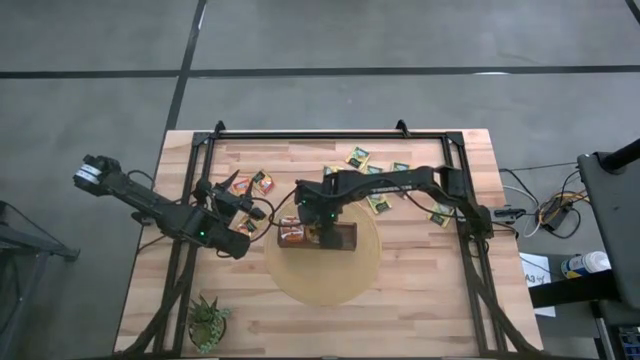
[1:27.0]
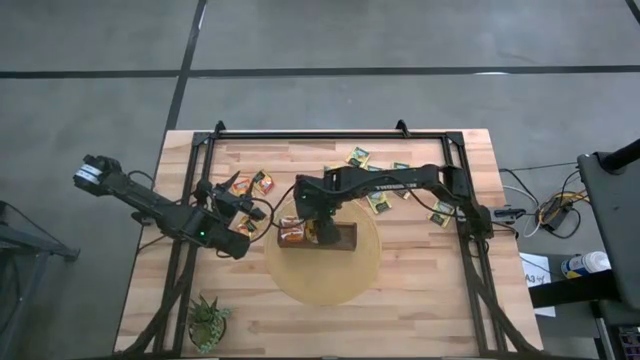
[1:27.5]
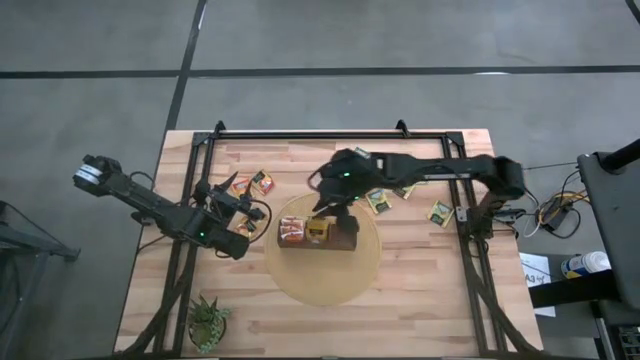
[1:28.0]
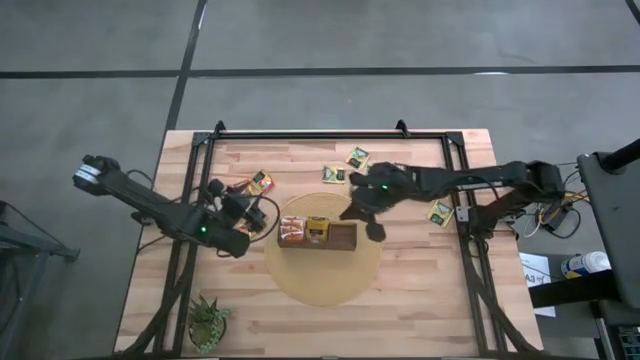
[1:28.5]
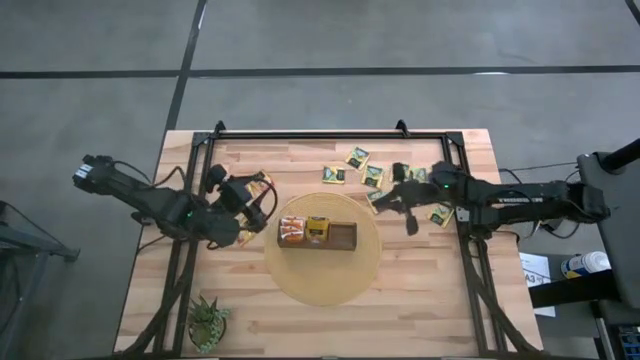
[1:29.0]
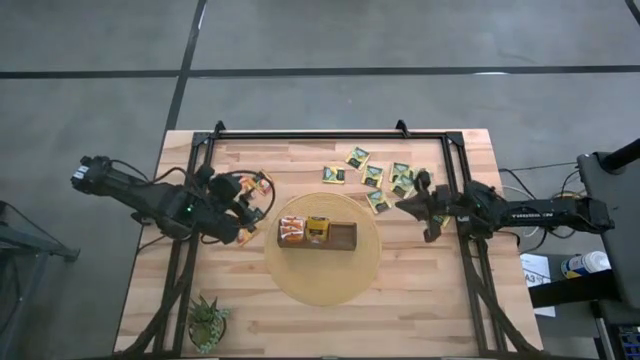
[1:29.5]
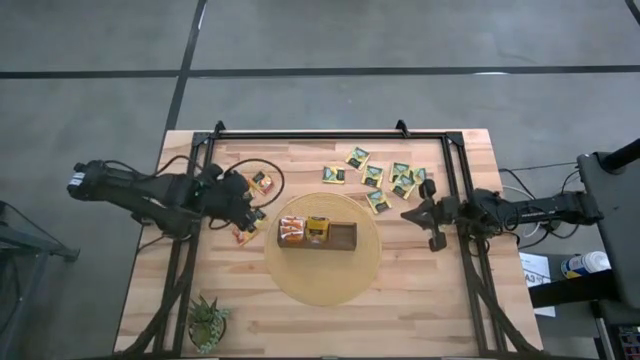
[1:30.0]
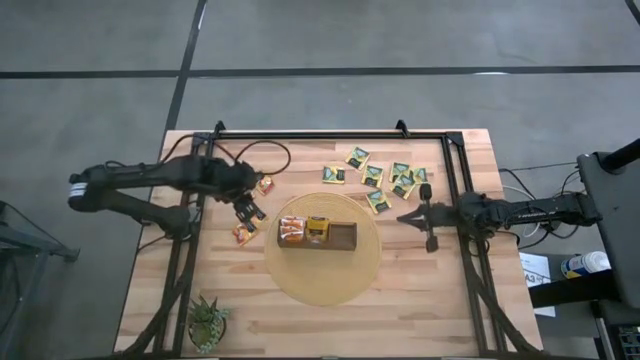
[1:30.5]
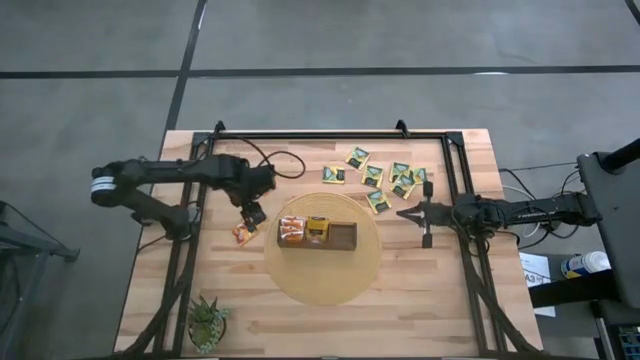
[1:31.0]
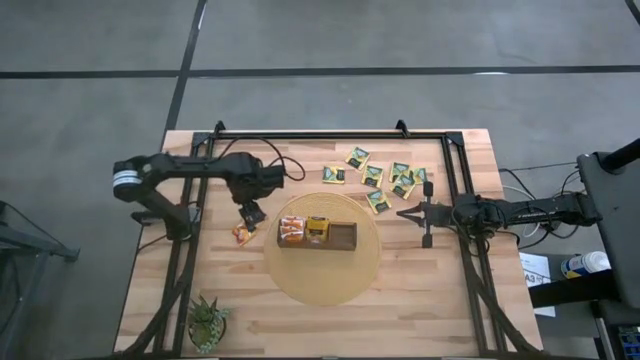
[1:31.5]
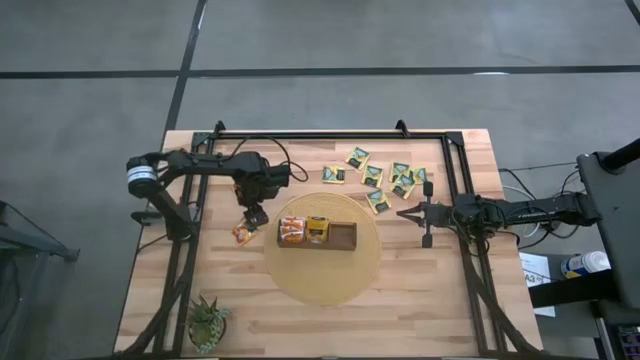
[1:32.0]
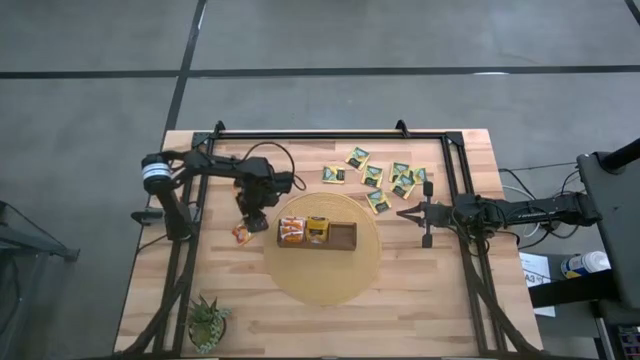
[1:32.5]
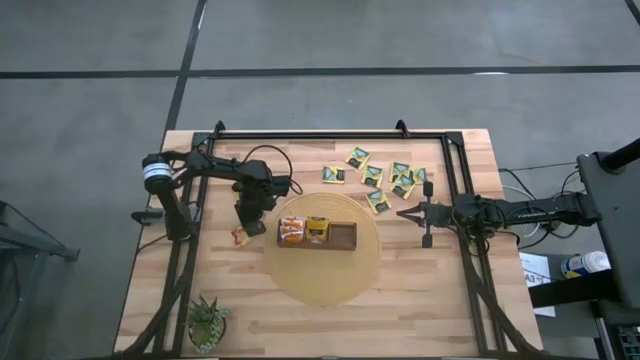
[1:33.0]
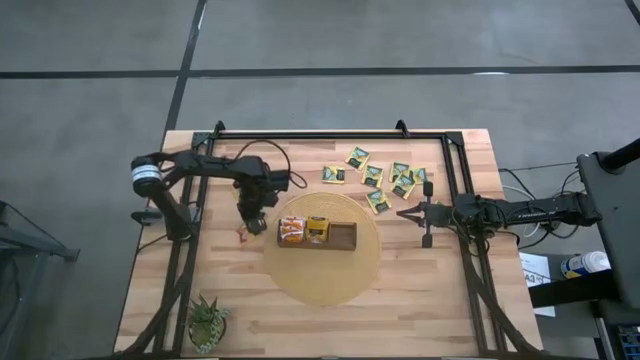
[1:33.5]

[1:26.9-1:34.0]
Task: Pick & Place Tea
Put the orange tea bag into the middle section of the wooden organizer

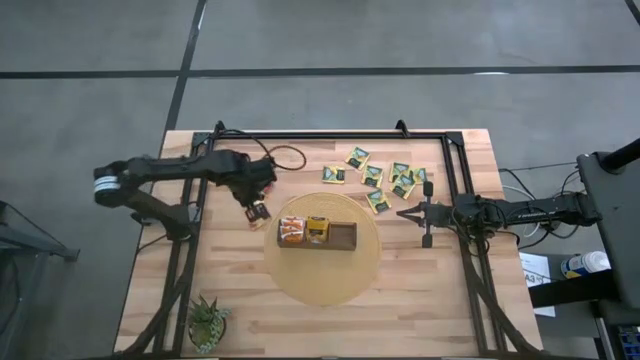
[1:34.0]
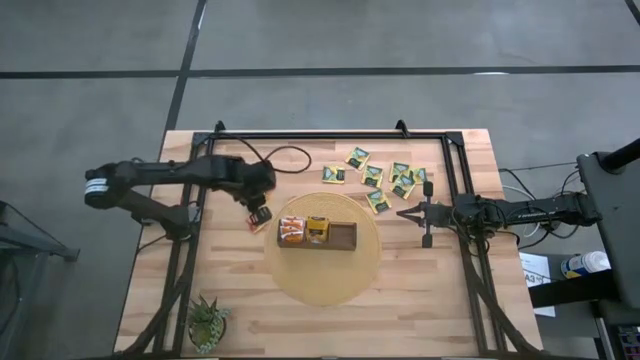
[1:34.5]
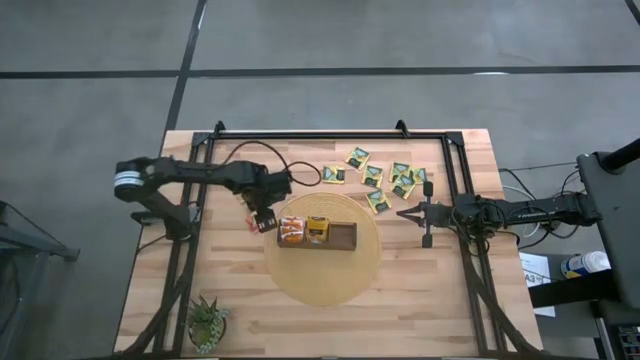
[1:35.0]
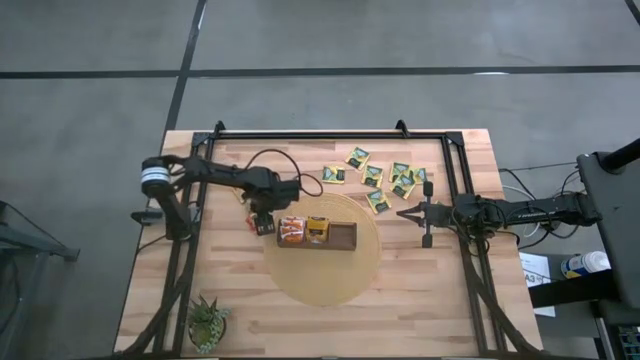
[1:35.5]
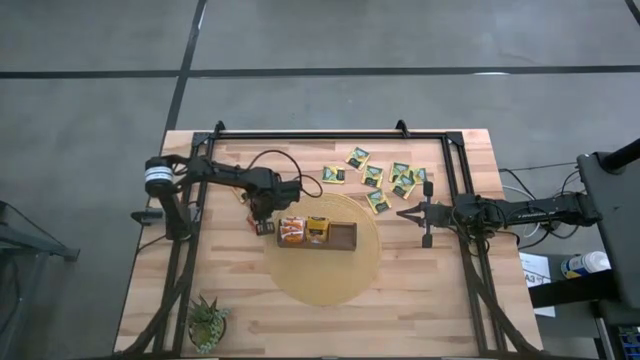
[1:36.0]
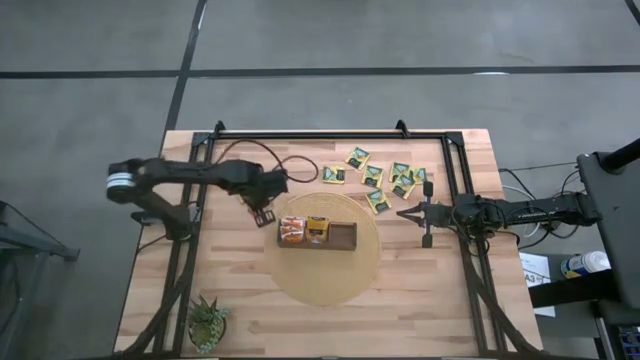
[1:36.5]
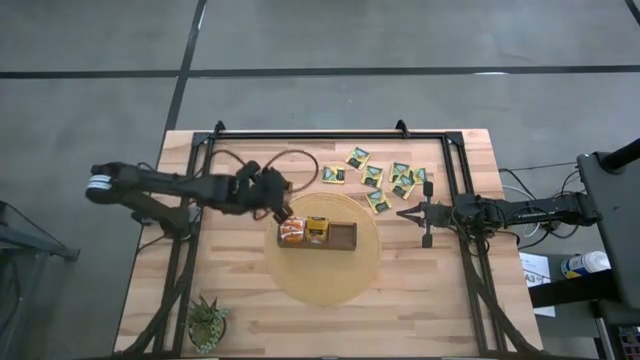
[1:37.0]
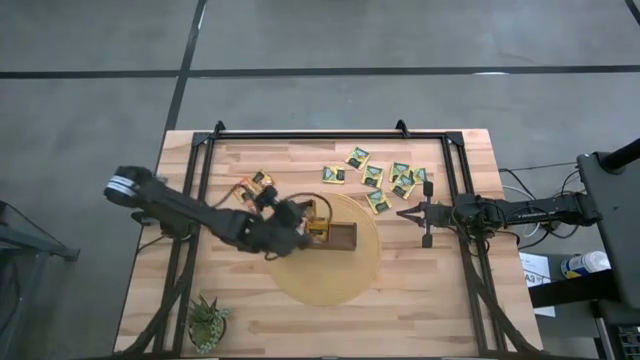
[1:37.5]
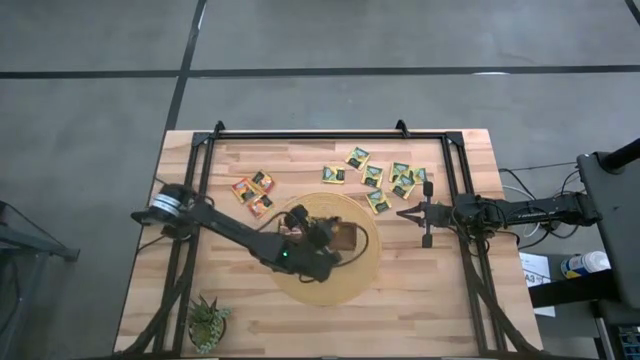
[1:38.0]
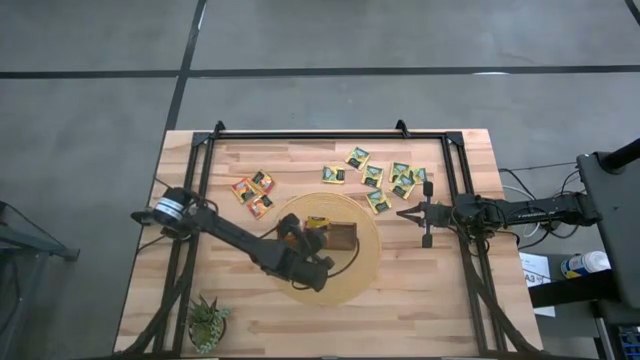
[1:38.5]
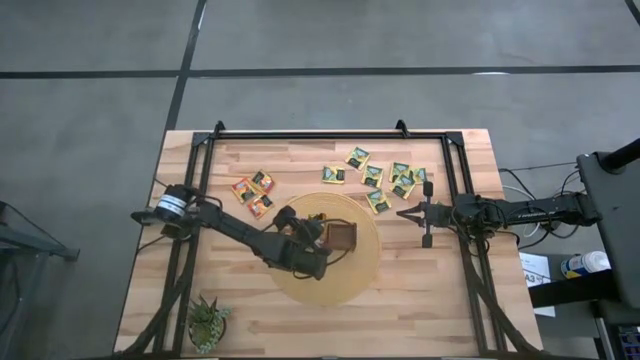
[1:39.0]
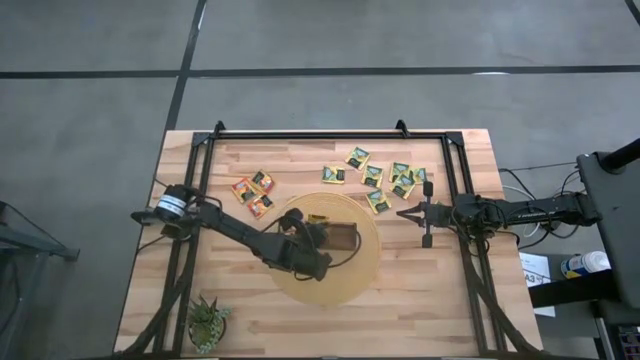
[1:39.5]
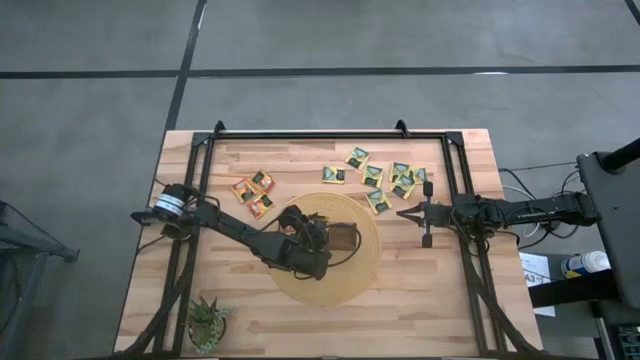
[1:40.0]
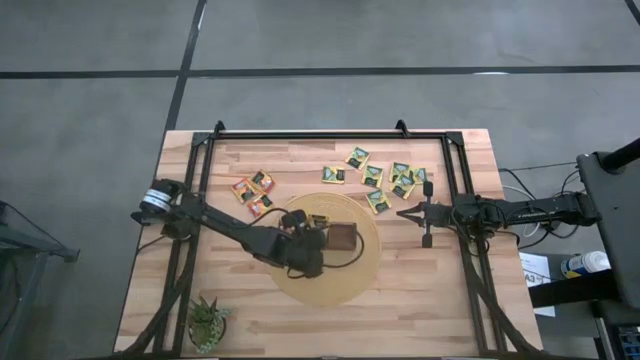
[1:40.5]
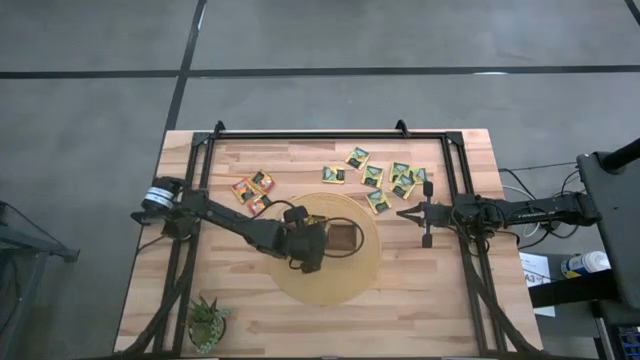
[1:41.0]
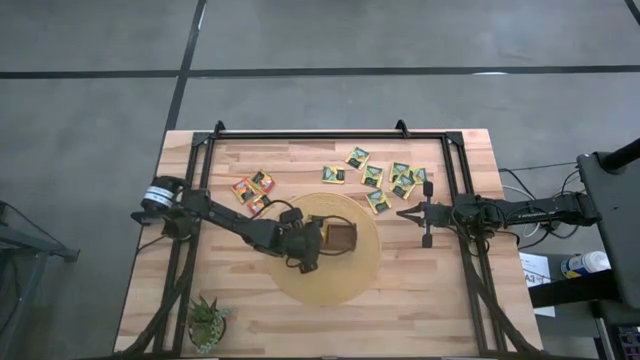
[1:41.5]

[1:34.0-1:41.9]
Put the orange tea bag into the middle section of the wooden organizer

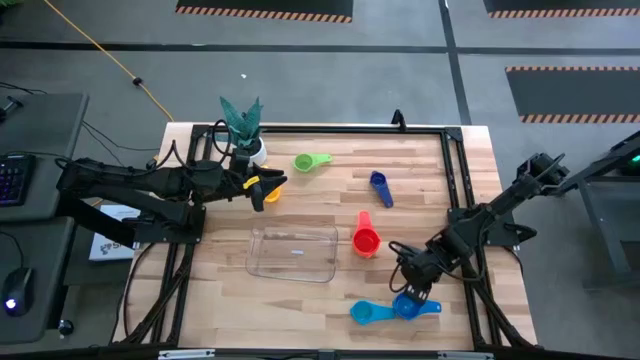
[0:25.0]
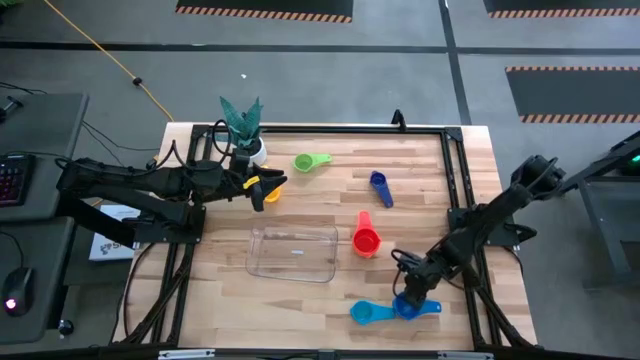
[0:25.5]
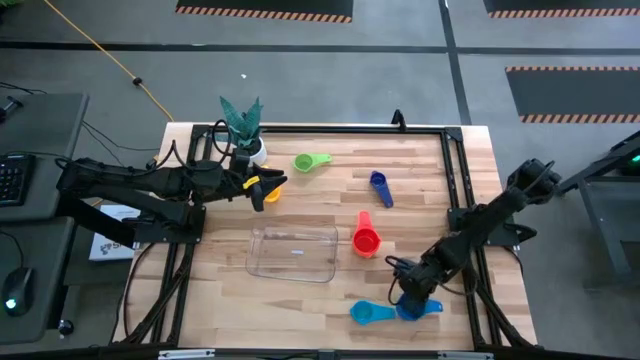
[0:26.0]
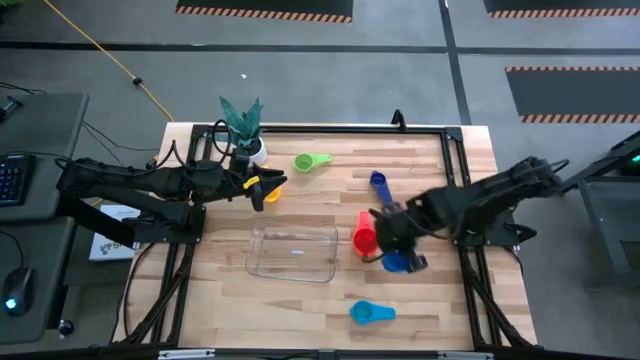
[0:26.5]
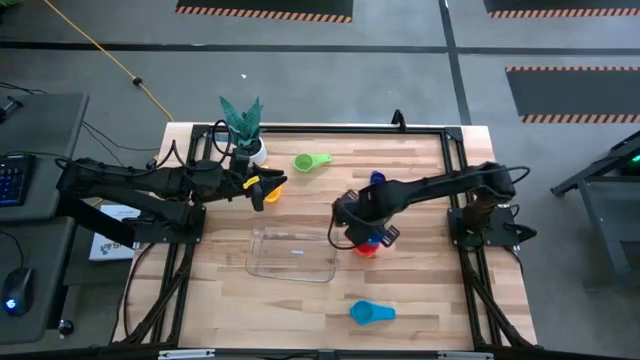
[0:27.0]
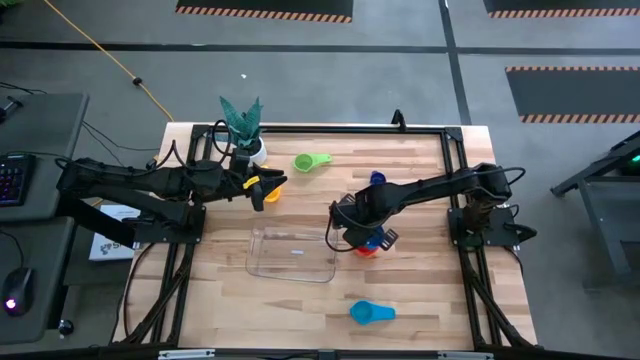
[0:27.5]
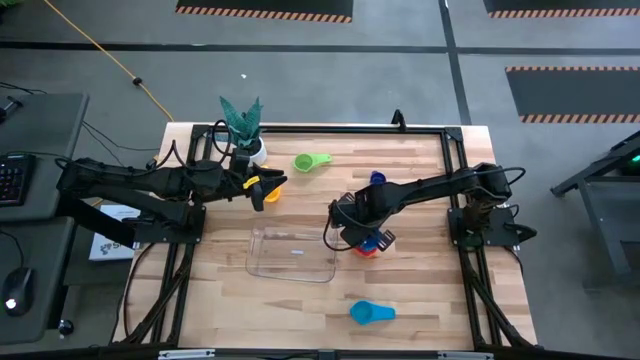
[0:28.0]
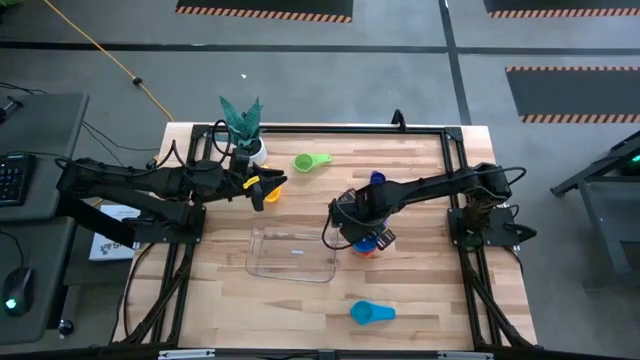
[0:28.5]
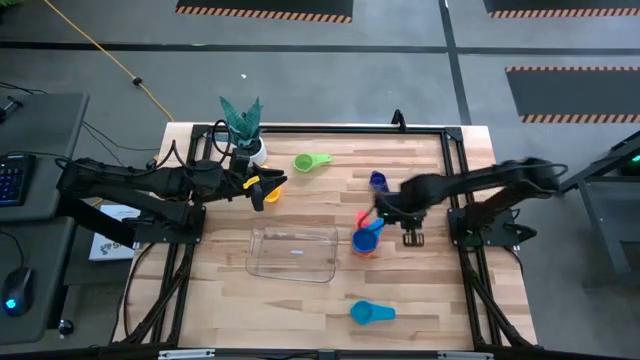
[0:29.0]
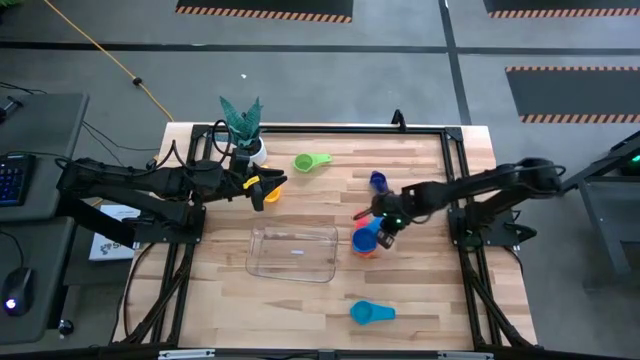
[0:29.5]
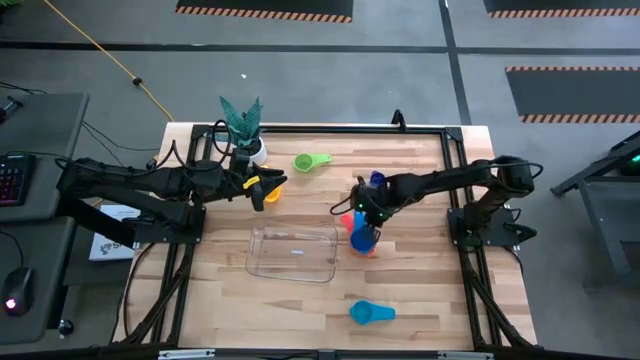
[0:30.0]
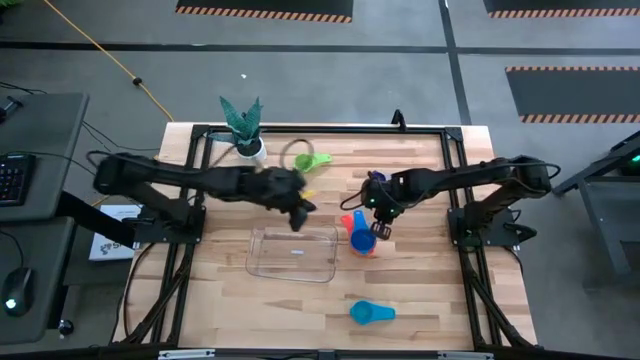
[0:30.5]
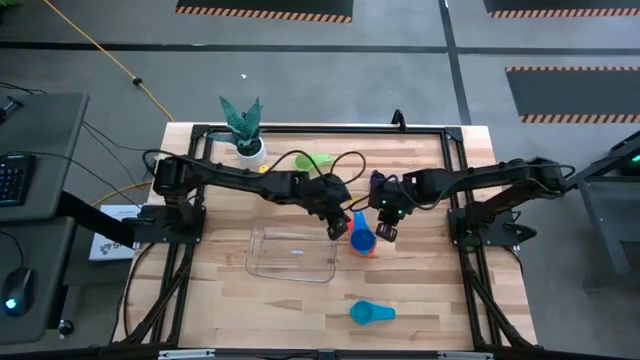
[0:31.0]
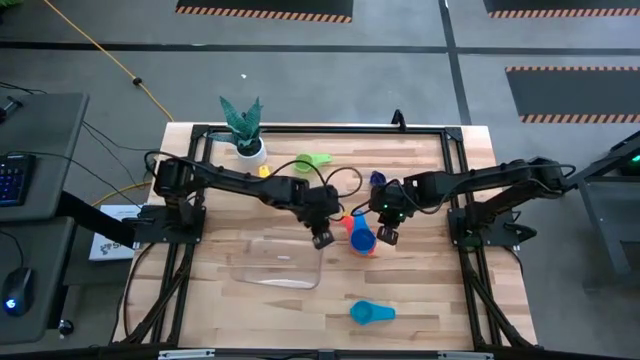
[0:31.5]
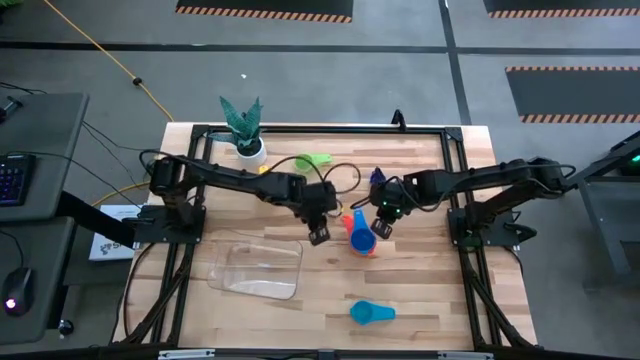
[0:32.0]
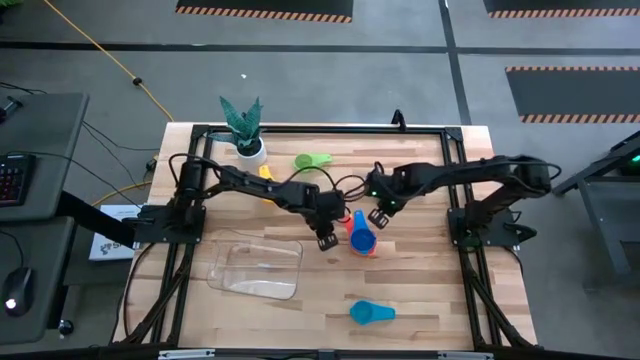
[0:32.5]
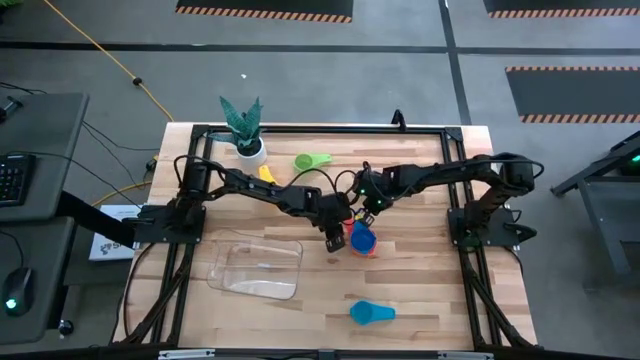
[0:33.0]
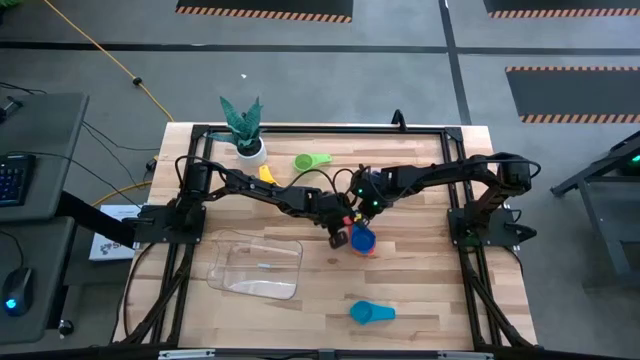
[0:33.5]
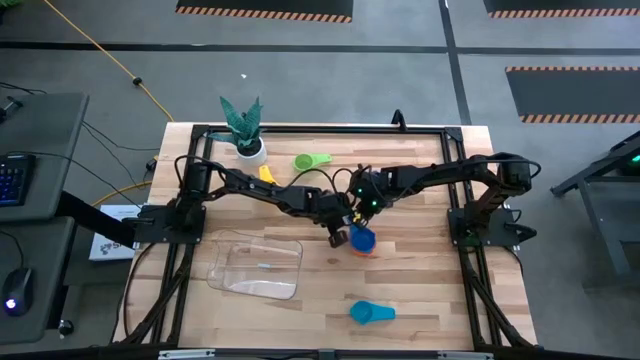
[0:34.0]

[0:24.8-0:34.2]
Task: Nest measuring cups in basket
Stack the blue measuring cup on top of the red measuring cup
